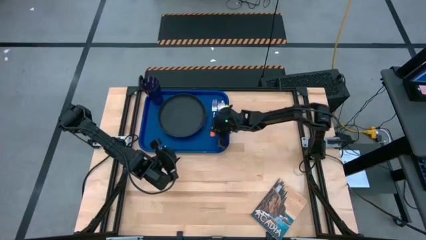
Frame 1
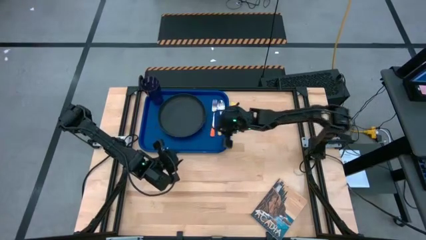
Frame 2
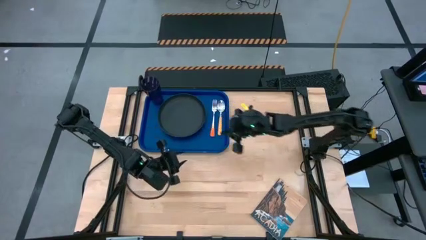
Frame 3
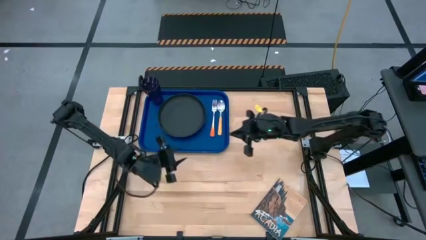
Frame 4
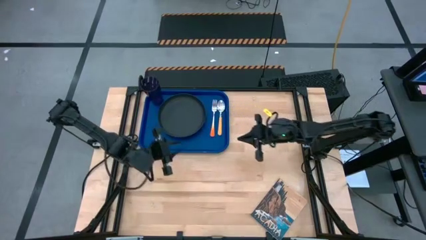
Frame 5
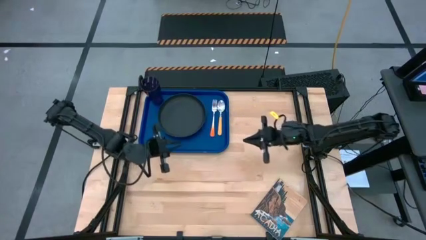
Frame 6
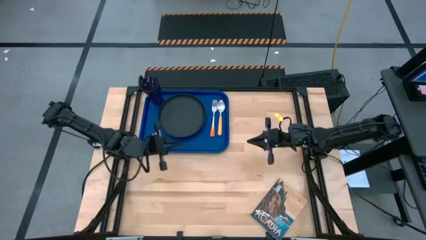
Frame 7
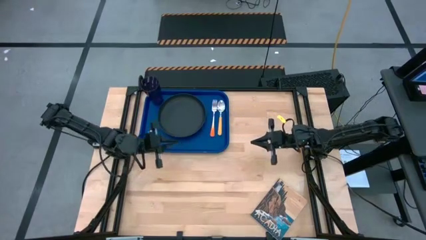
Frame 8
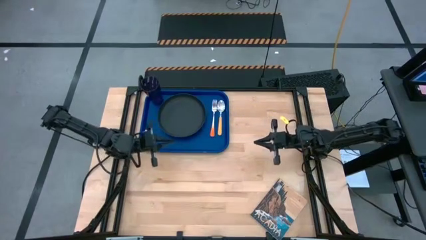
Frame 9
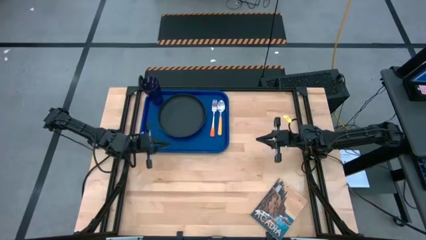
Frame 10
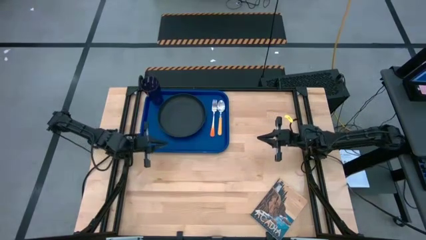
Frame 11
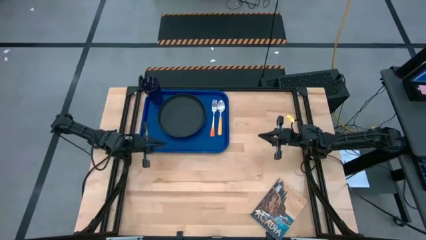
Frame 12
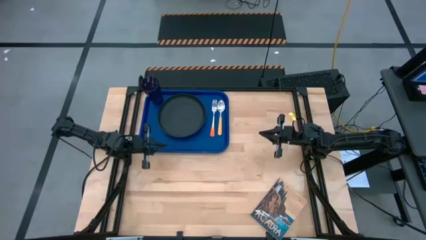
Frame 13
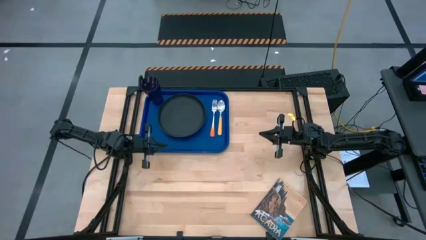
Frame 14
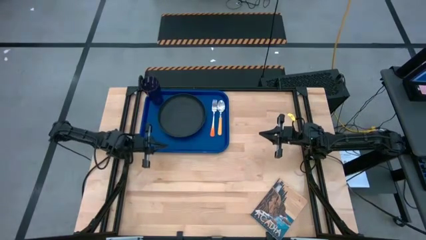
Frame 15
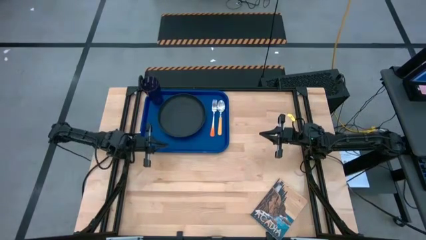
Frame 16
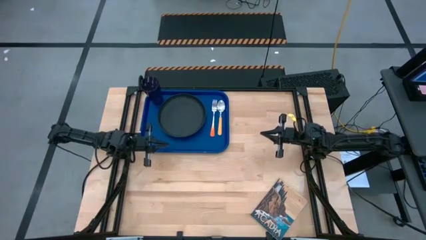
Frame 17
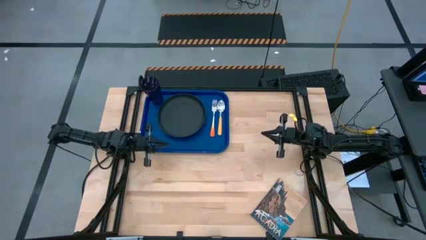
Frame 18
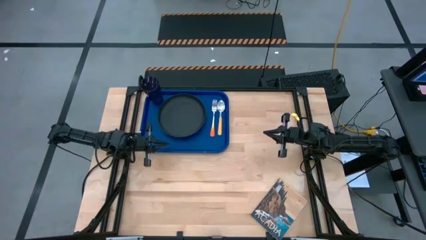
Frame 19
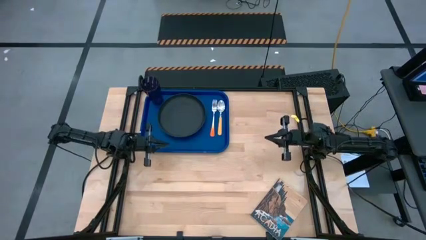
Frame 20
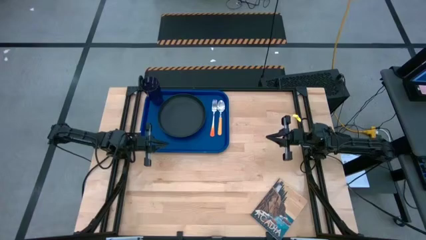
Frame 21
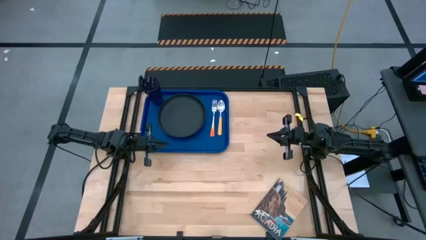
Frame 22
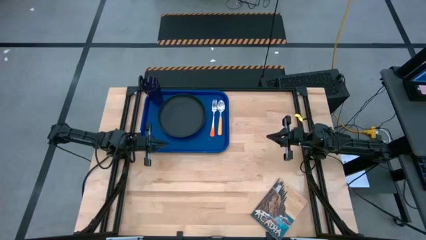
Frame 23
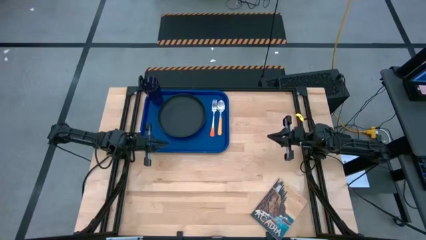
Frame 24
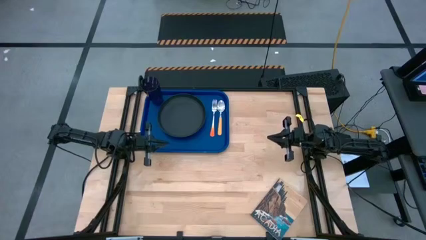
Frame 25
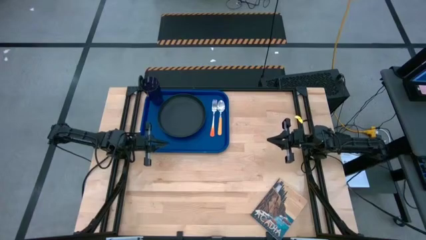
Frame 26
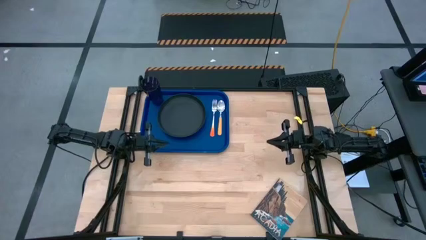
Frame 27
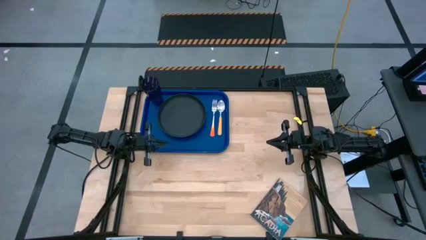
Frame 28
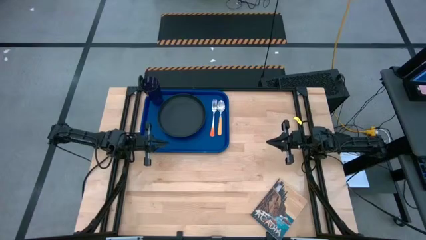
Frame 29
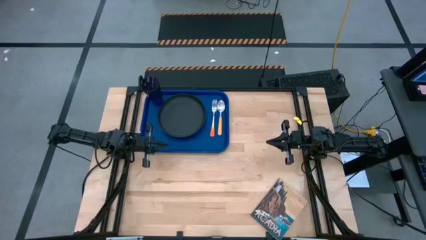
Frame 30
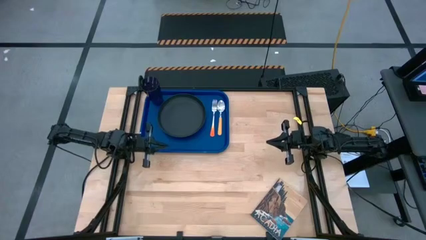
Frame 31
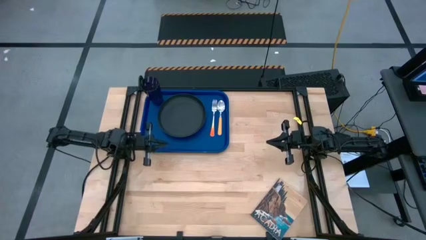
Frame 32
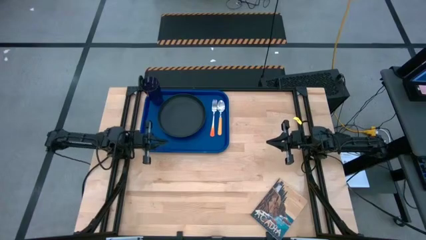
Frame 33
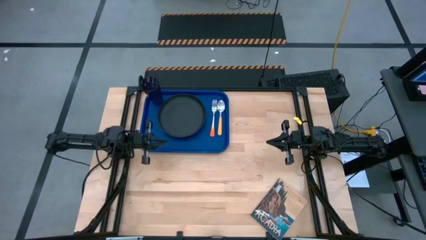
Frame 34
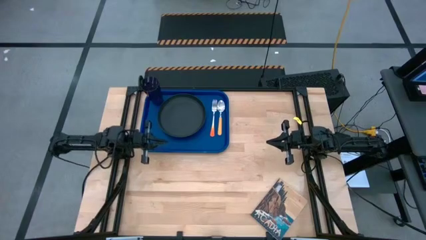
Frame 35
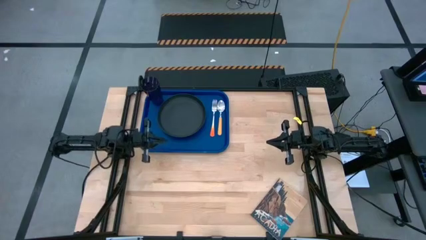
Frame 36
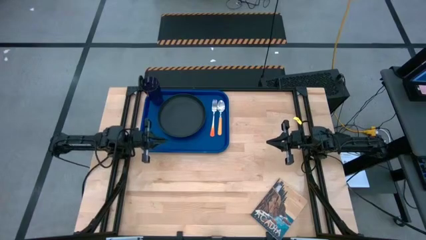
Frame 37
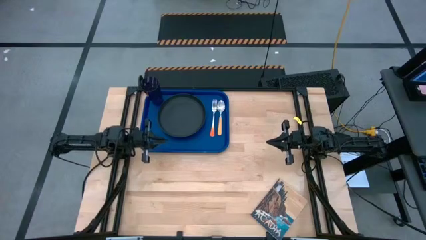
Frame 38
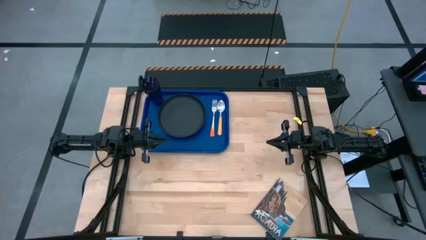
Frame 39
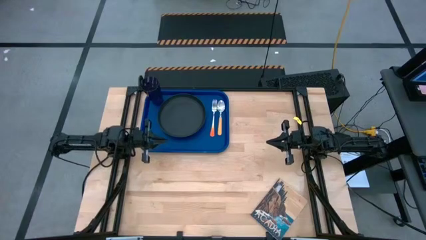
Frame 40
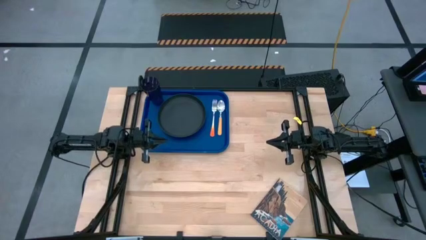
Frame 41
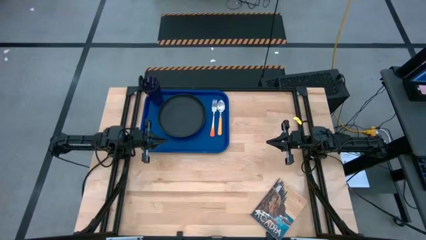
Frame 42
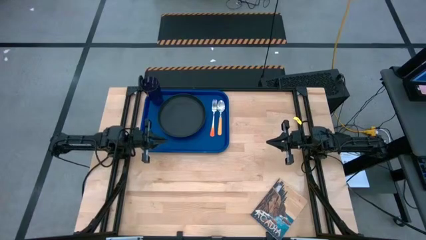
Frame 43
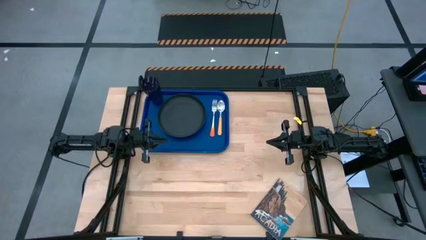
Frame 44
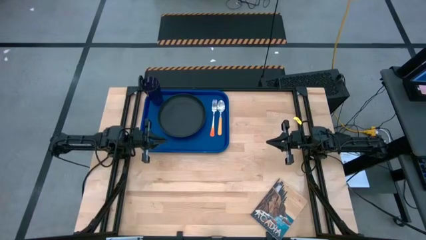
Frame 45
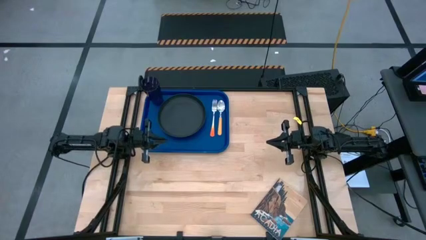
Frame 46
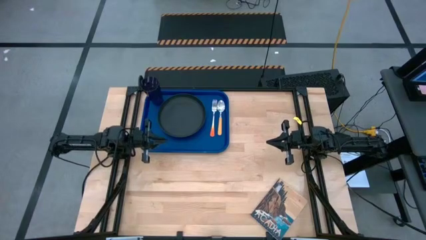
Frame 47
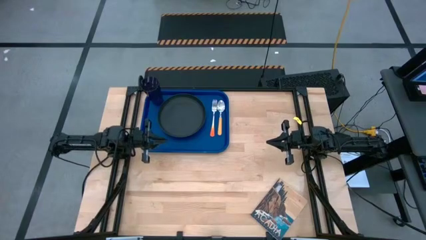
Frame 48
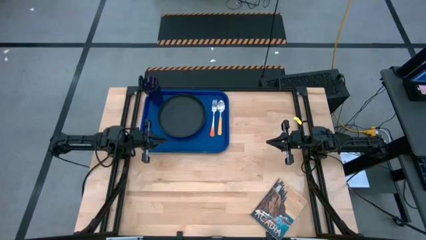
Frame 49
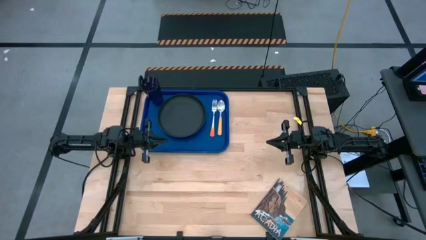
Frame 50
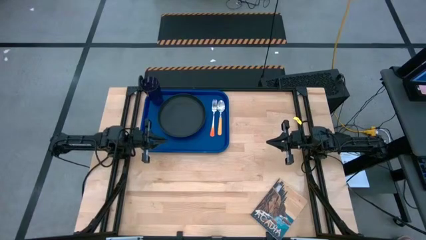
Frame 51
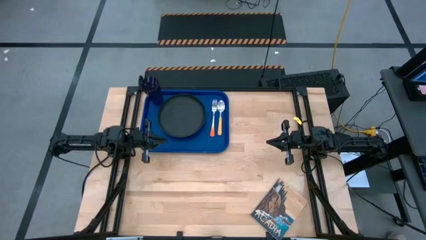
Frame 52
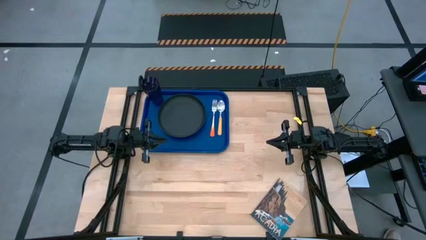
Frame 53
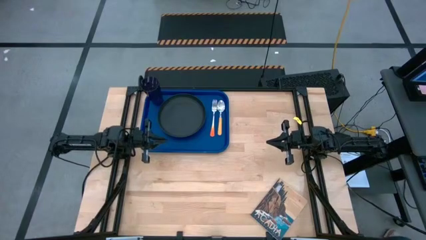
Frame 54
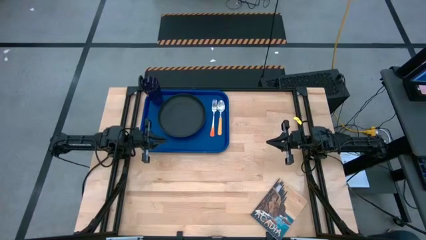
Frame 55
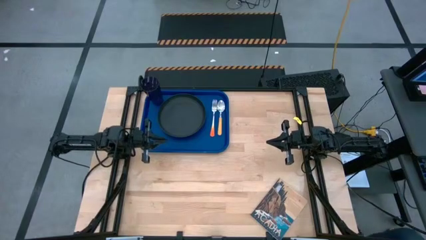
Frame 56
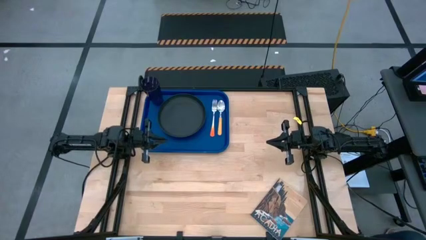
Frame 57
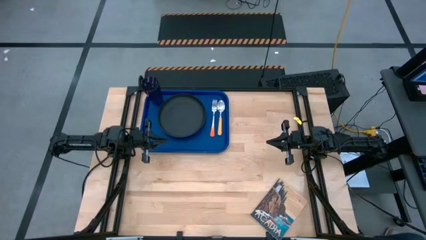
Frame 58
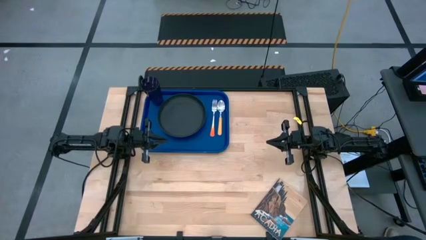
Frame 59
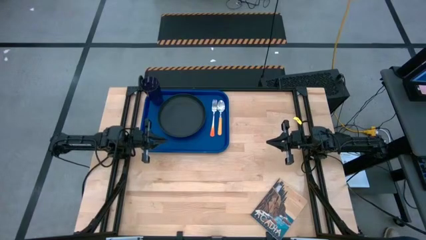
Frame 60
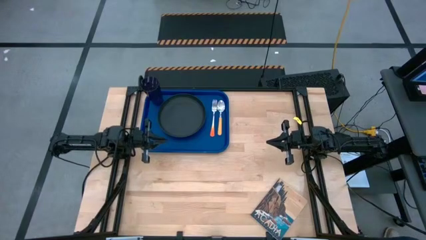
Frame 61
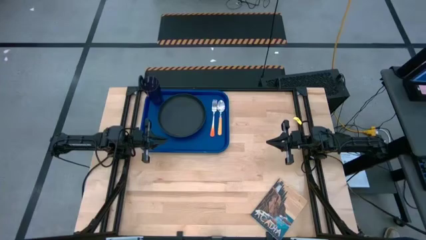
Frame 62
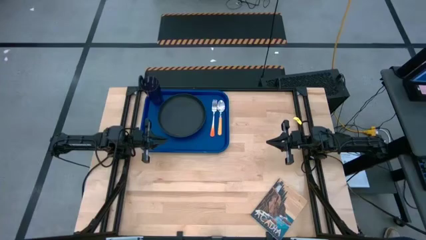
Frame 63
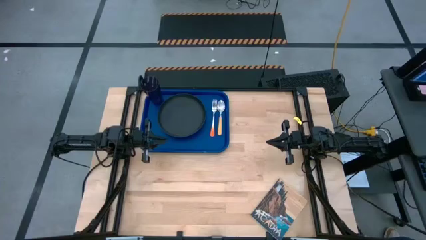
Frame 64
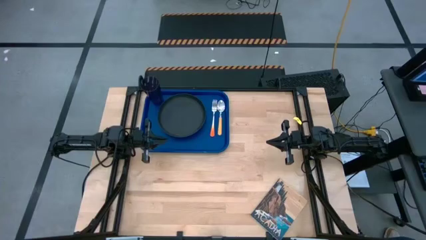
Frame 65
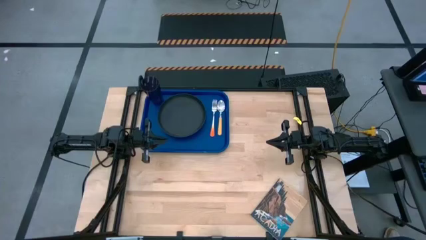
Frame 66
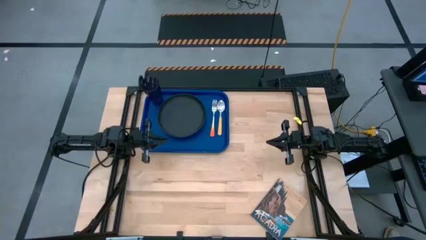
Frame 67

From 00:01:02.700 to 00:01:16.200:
Task: Pick and place plate/cup/fork/spoon on tray
Return to Home Position
